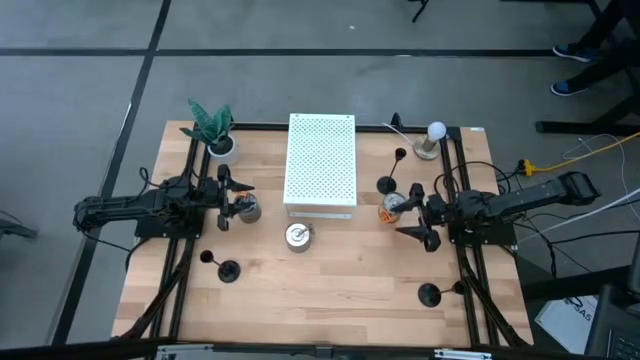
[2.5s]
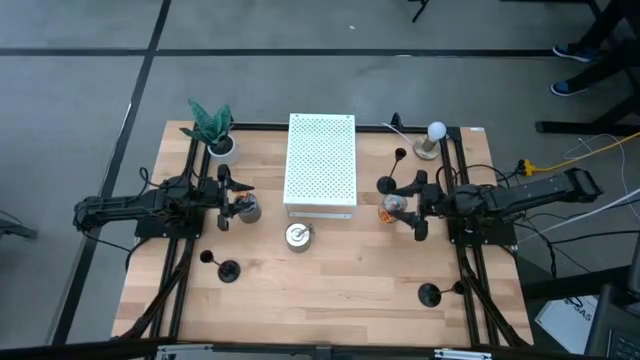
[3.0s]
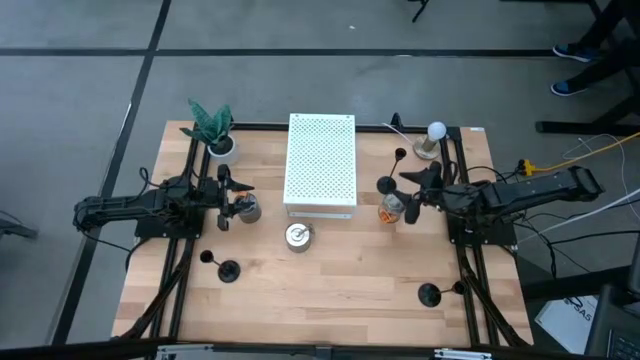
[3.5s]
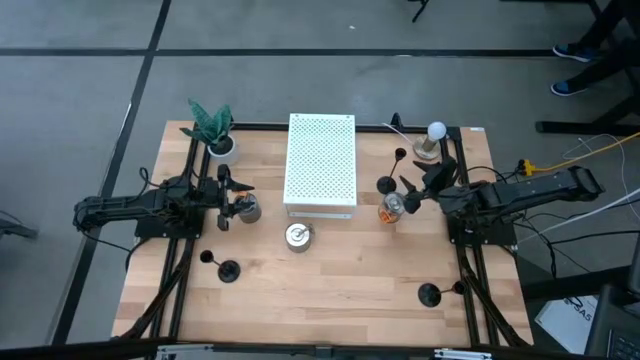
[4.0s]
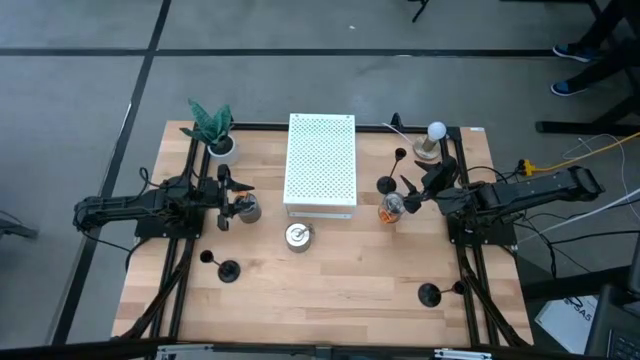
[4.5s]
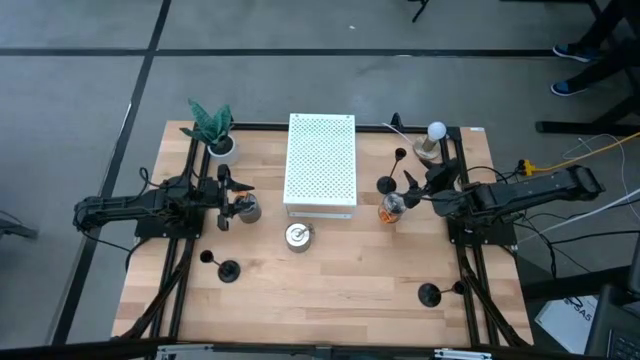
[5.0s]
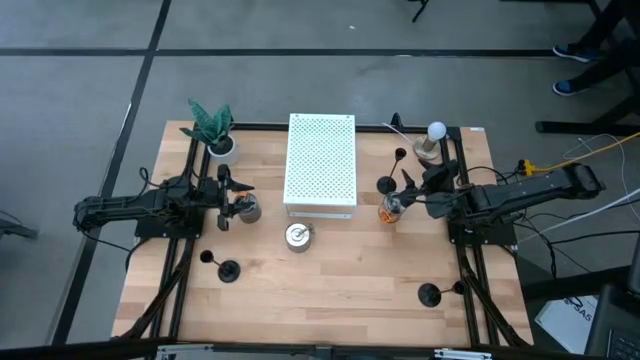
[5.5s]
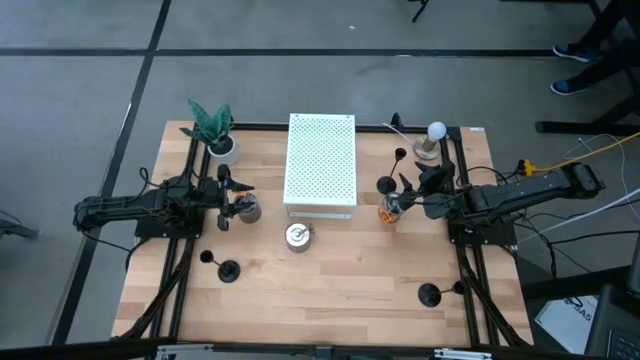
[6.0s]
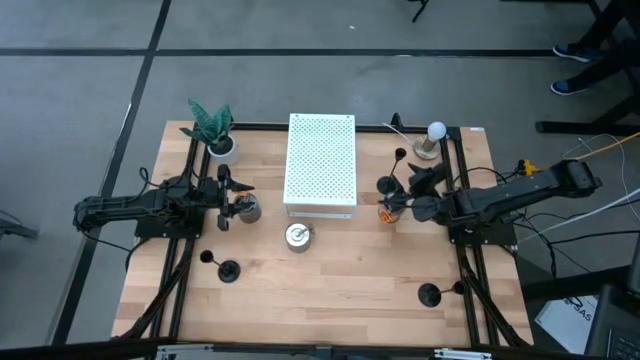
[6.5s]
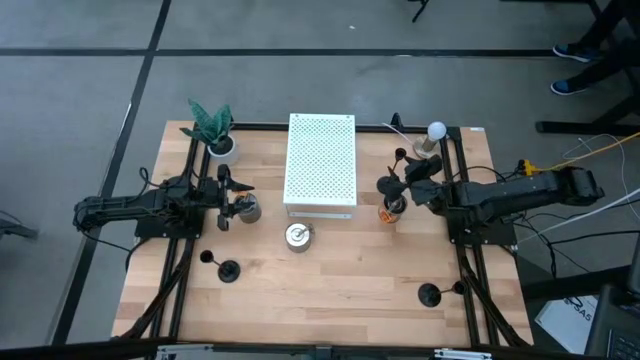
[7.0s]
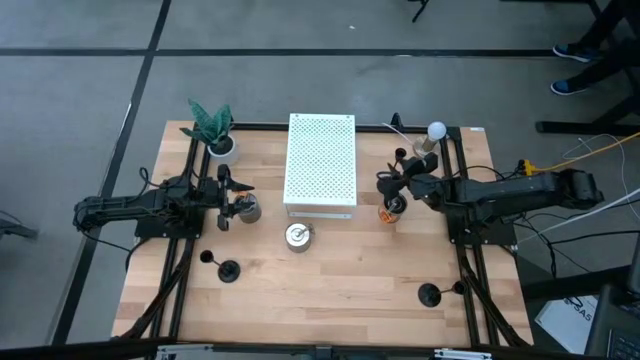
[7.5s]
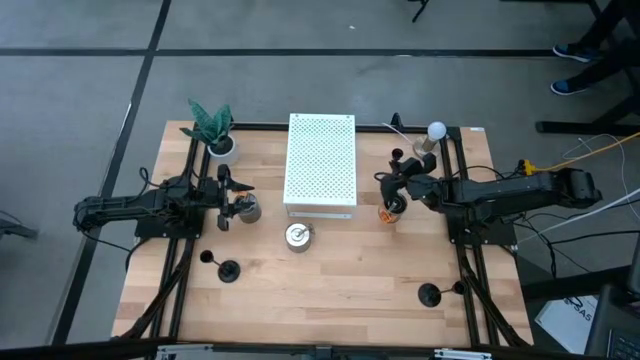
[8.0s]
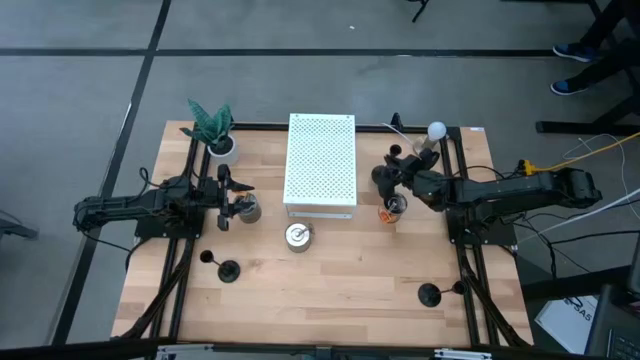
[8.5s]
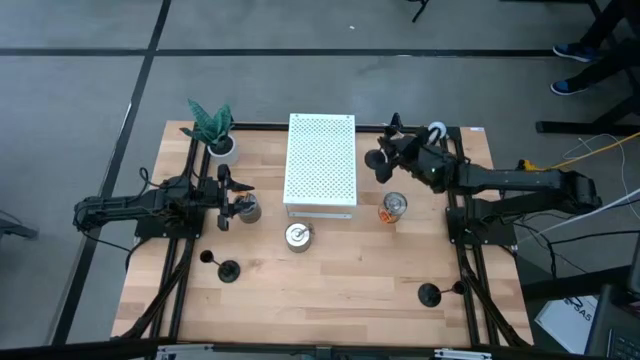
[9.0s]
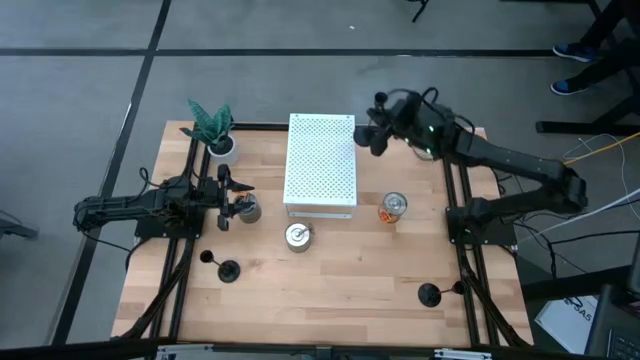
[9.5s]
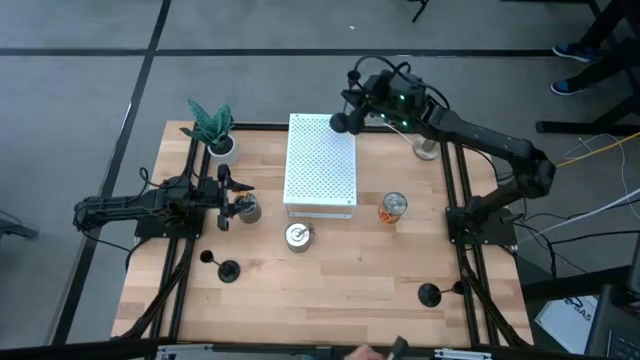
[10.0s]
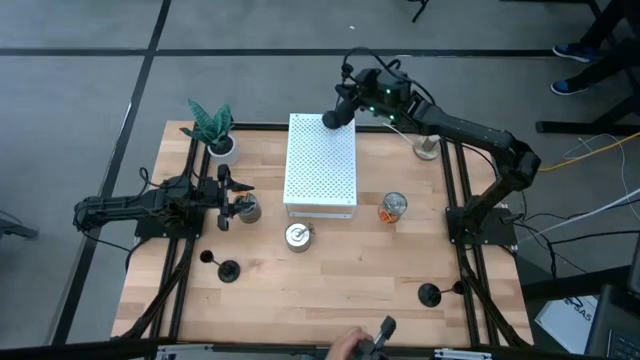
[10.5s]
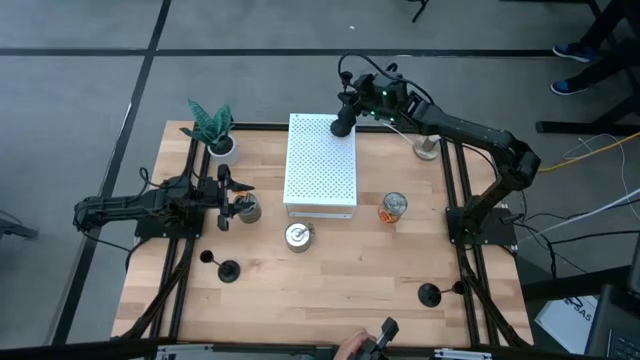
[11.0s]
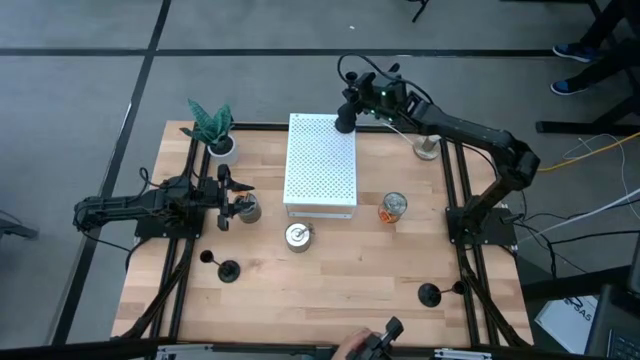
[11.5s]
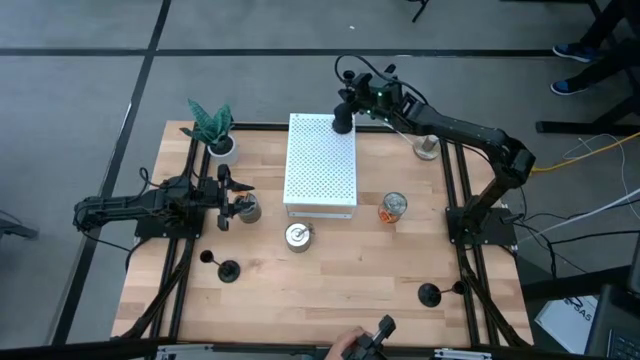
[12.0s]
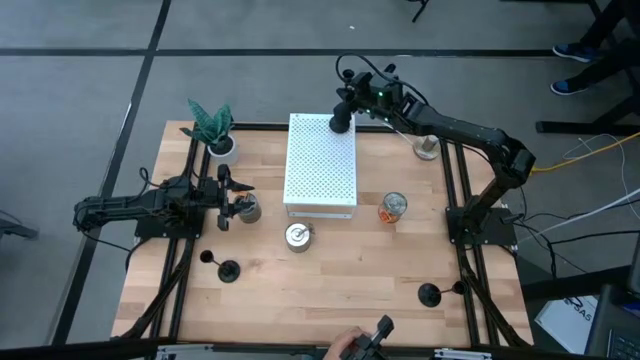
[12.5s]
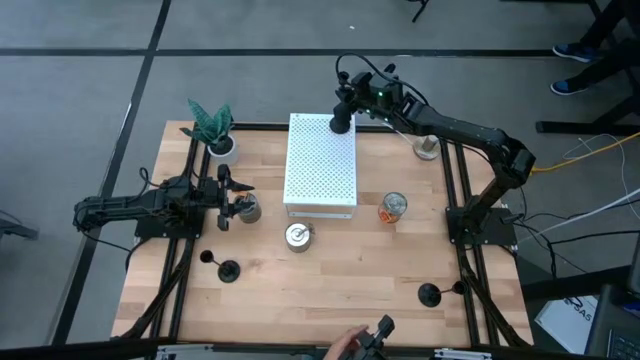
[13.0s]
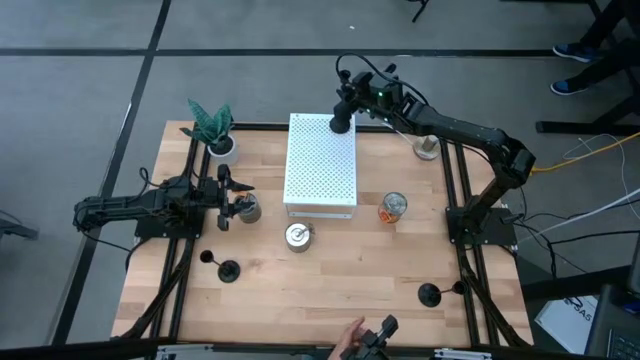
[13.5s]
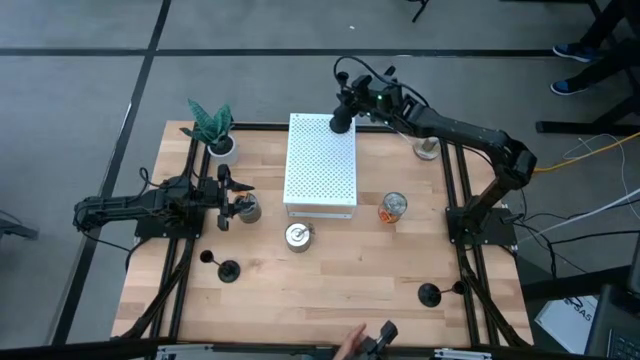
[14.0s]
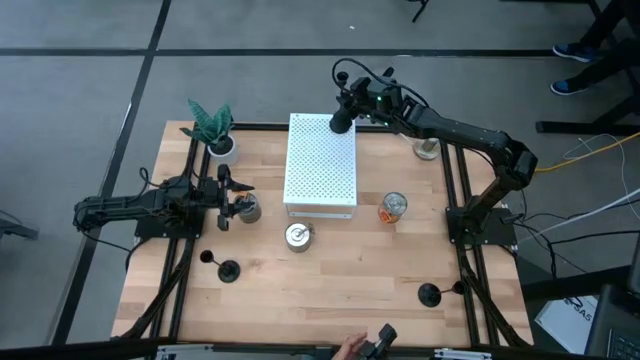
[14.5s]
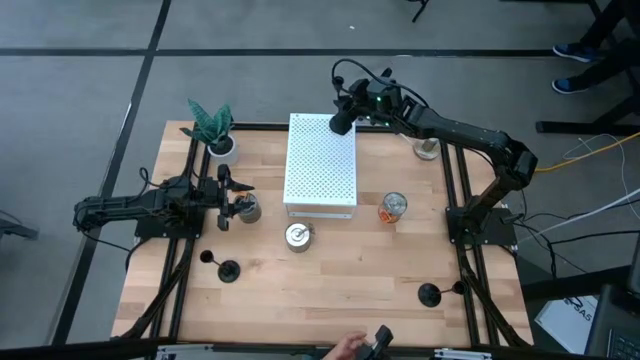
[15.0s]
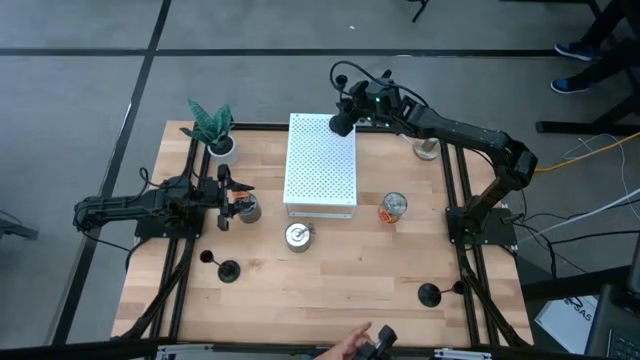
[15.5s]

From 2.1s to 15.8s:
Task: Pick & Place candle stick holders
Put the top black candle holder on the shelf
